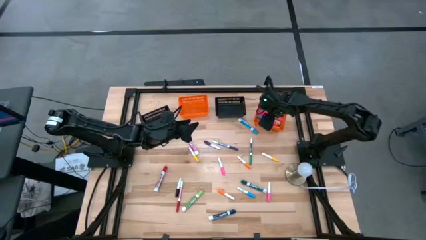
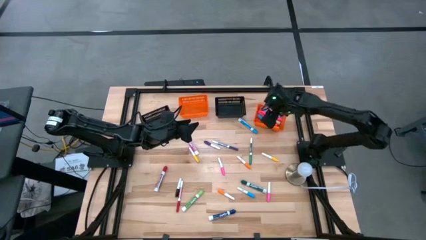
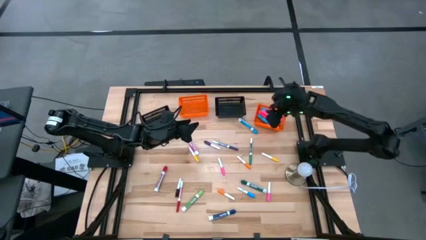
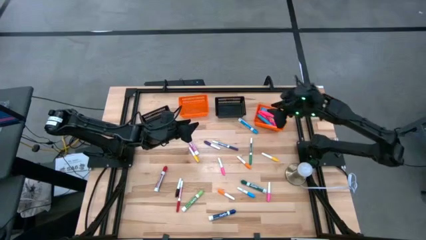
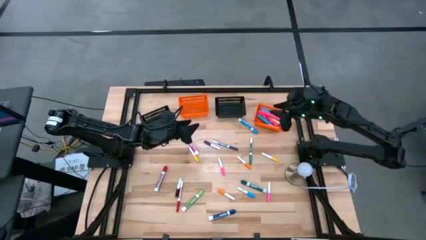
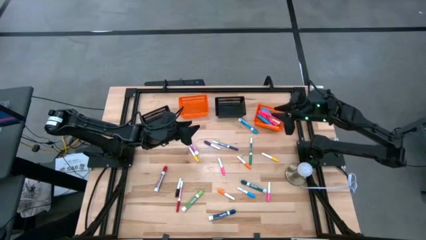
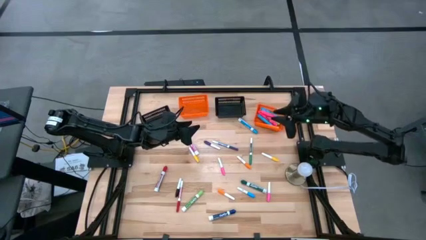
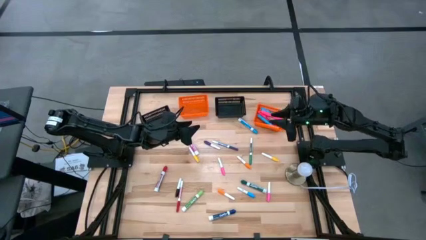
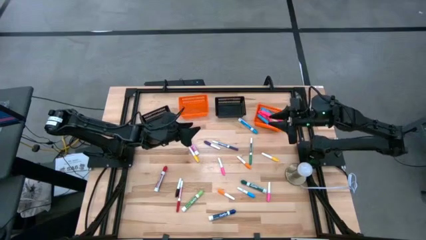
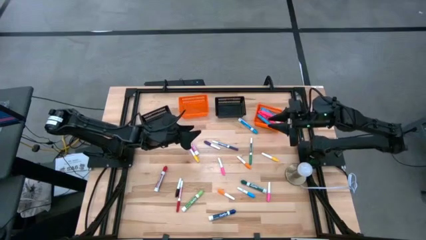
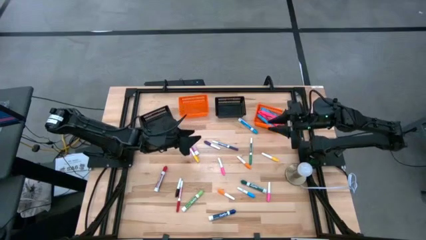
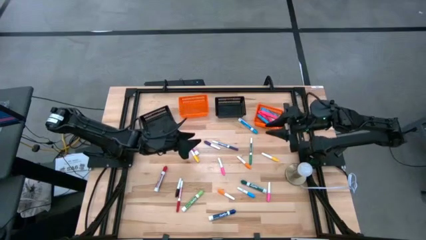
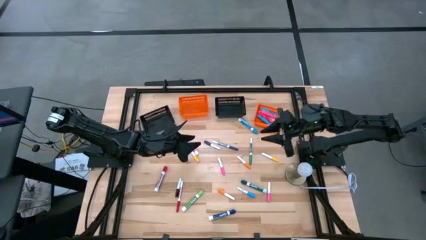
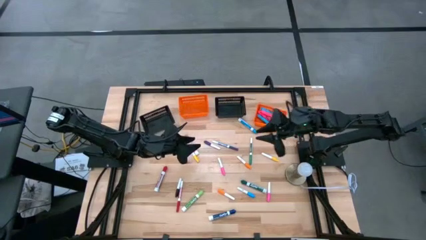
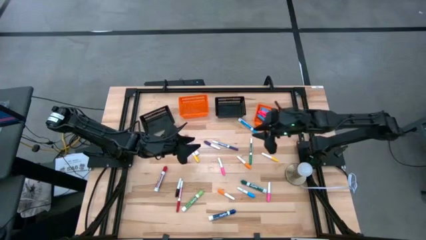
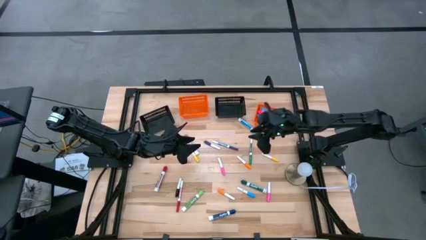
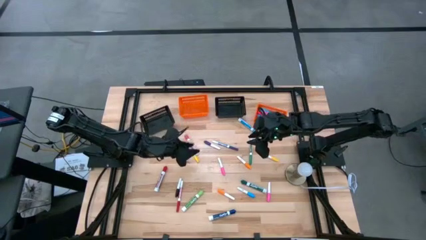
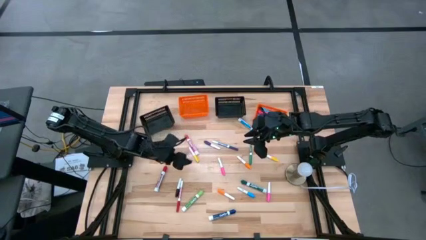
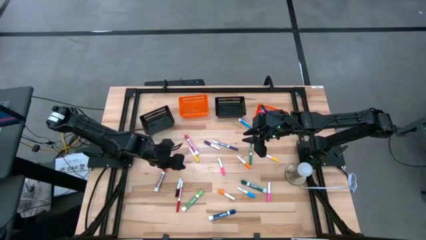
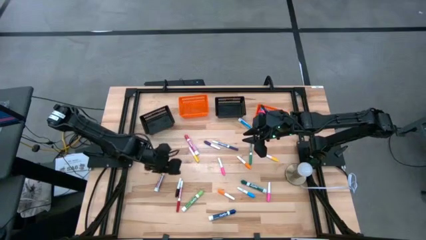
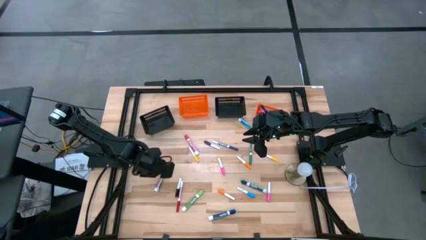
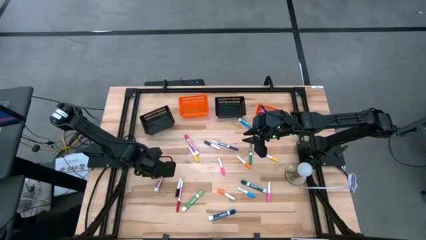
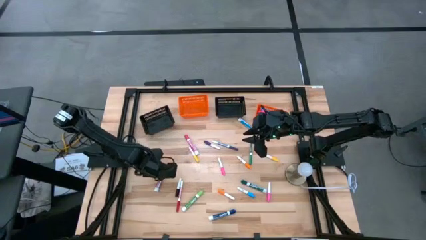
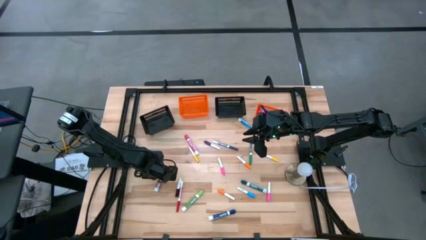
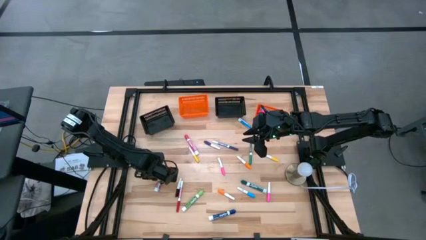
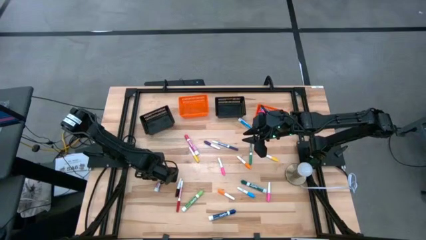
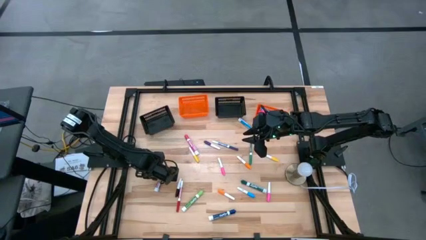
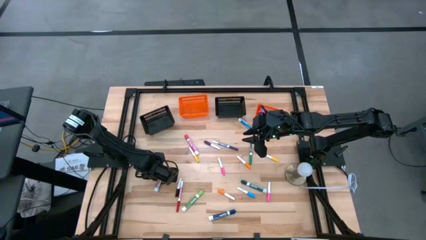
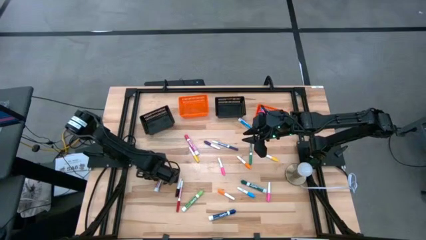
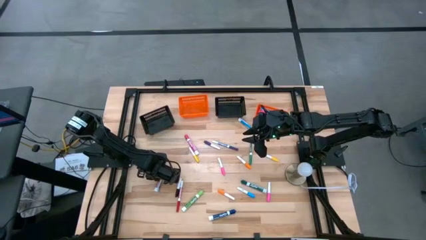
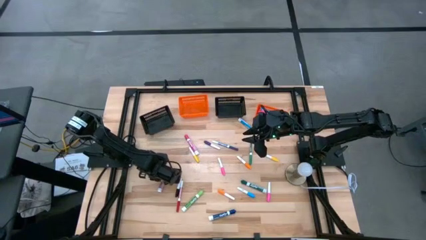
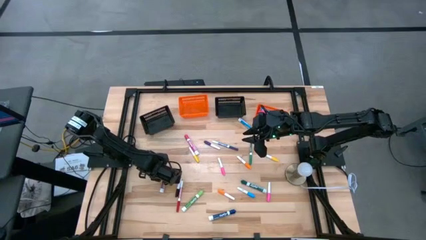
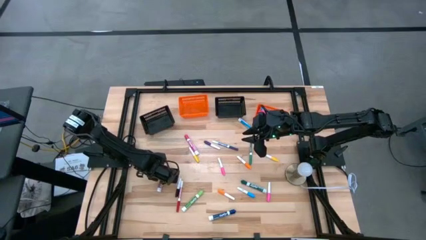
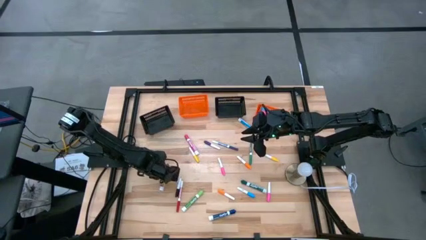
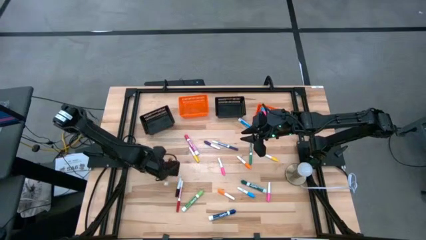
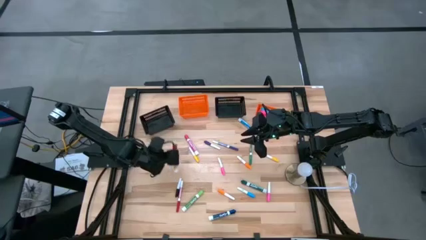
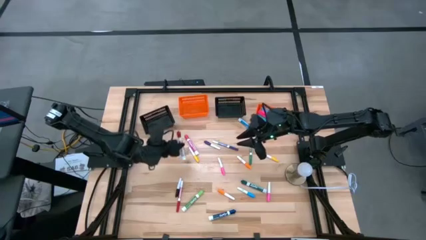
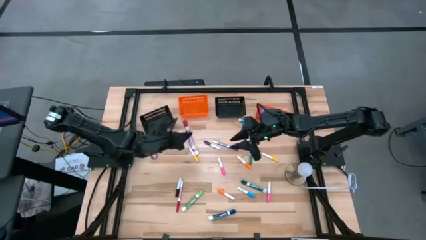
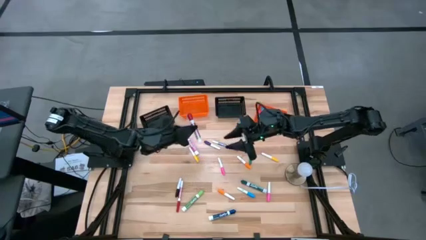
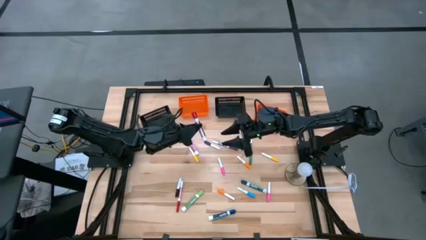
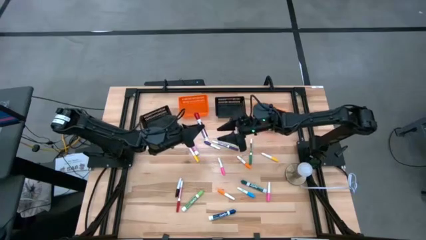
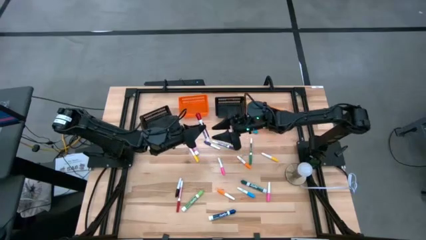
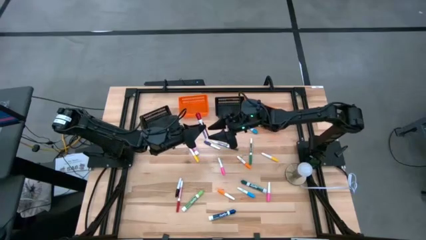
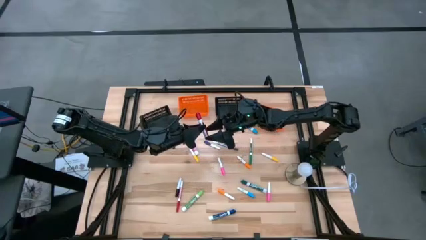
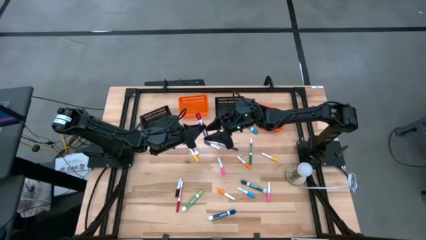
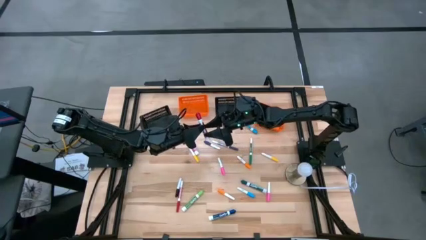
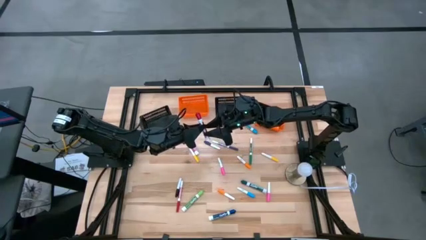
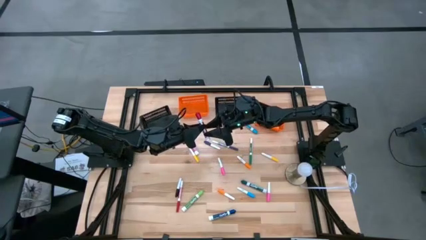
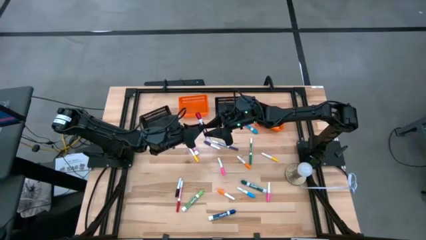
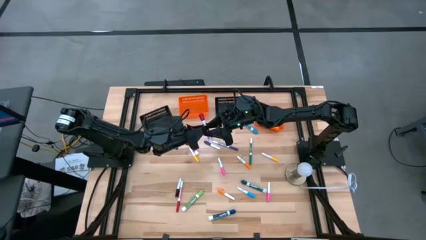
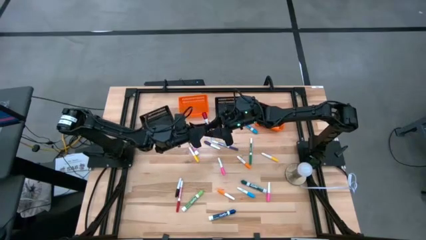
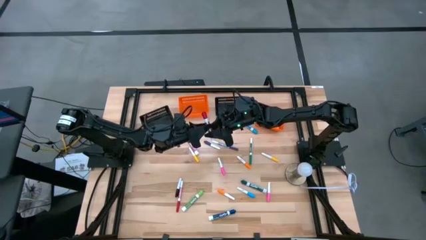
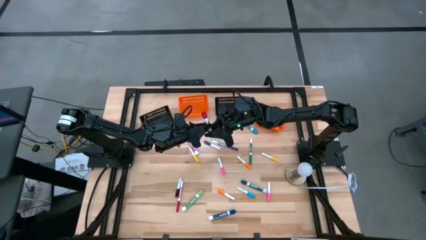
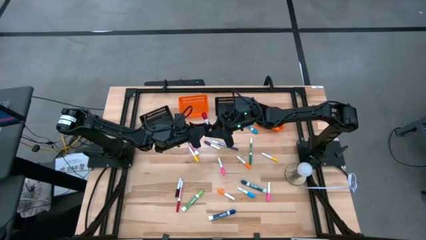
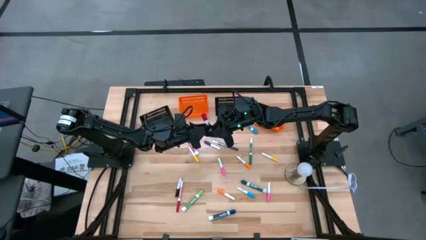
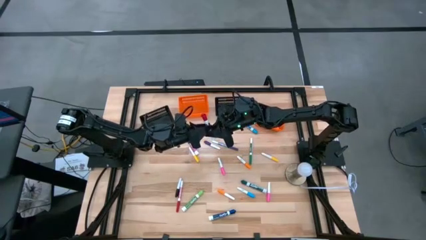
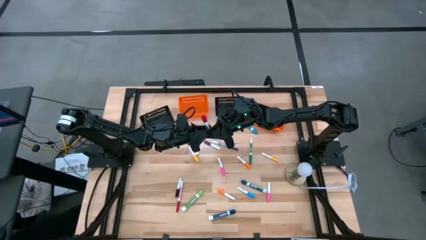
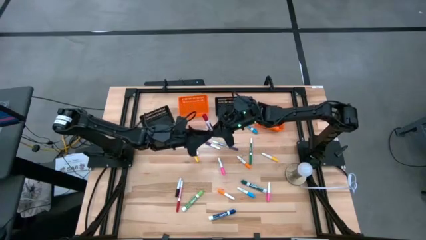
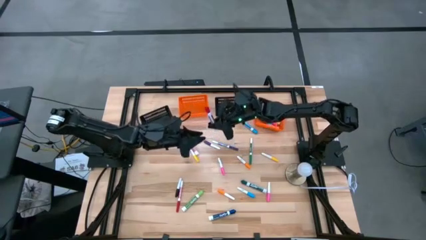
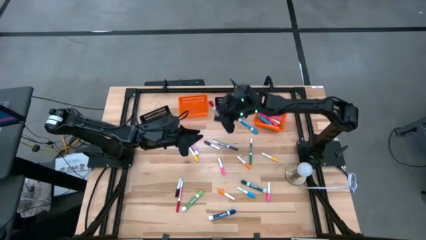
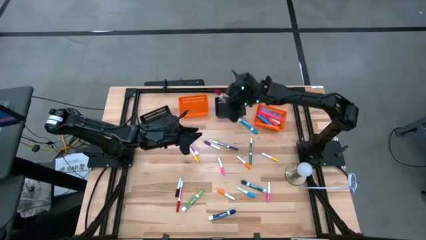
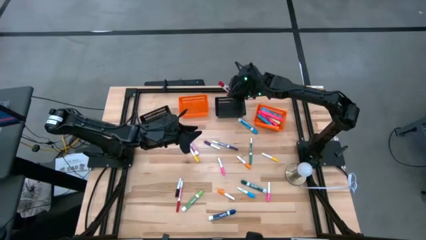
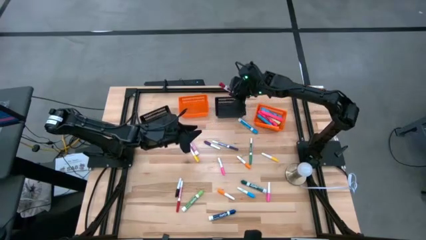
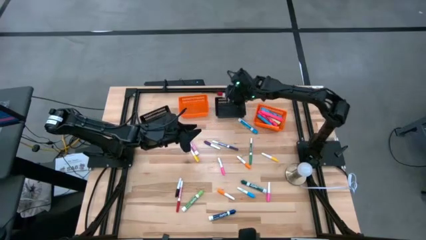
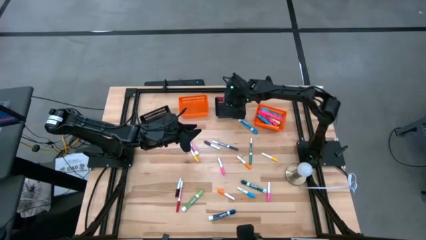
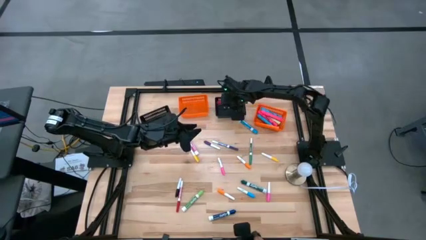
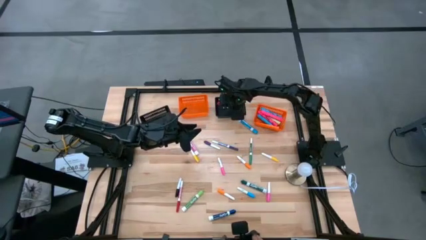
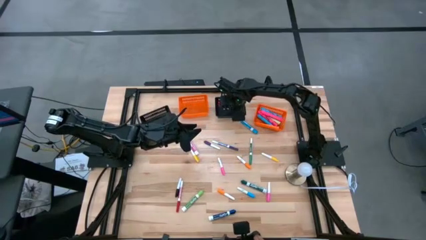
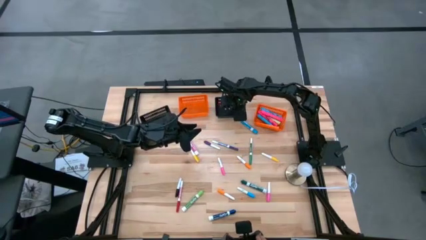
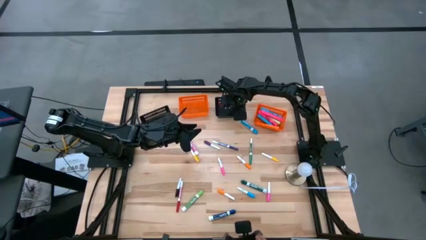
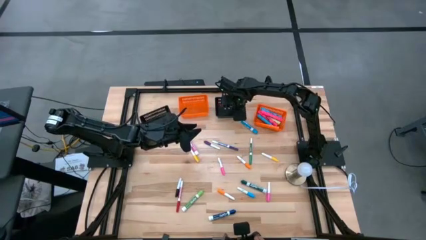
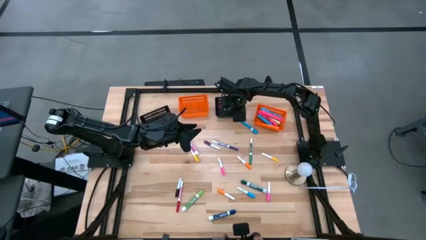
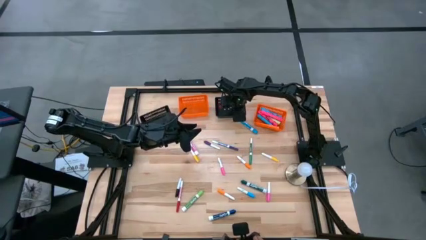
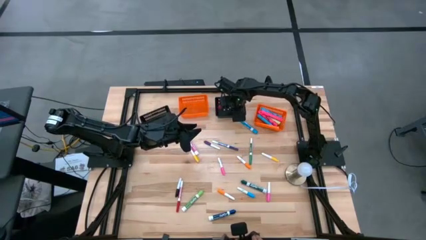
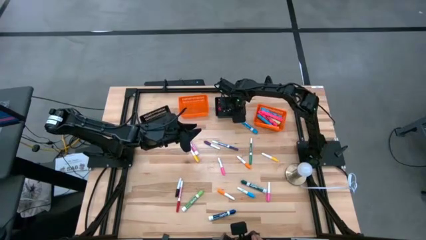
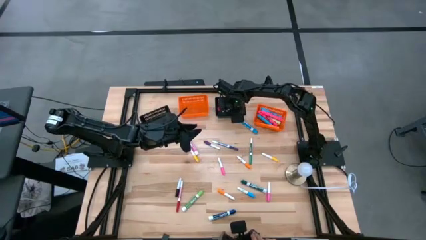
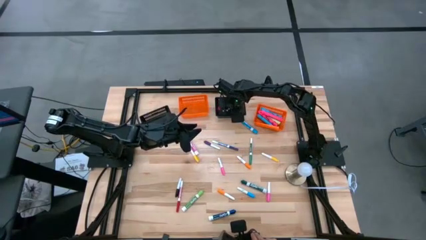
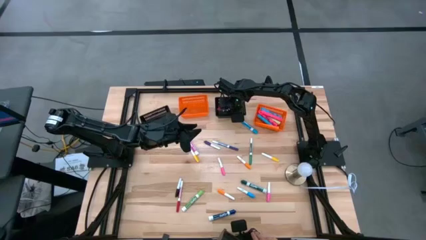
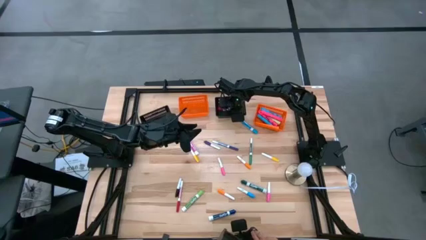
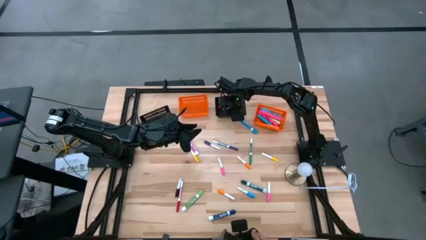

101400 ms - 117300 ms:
Task: Pick & Place Markers
Put the middle left white red marker into the middle black bin

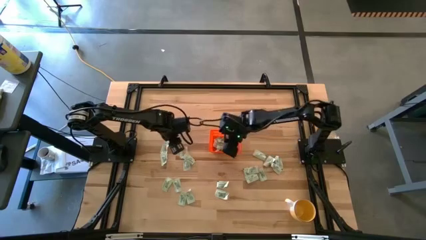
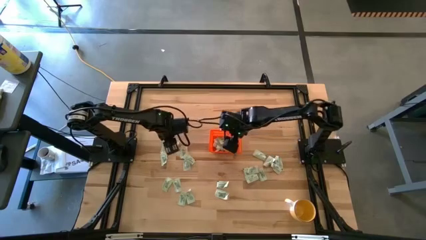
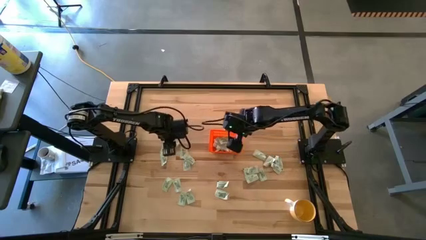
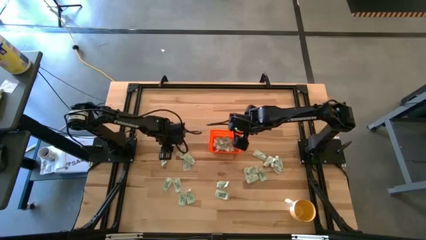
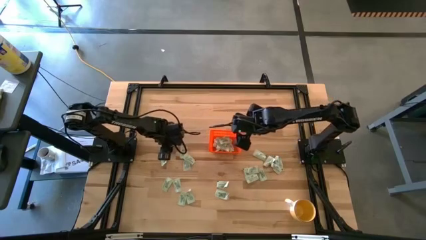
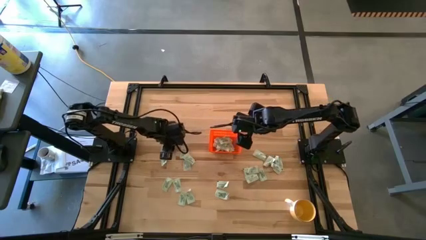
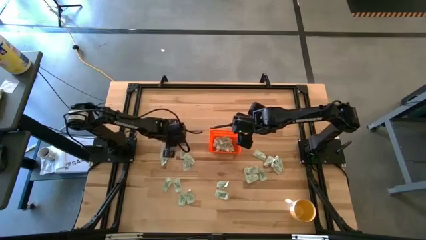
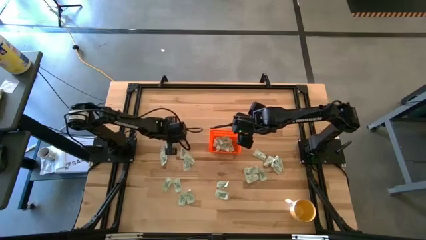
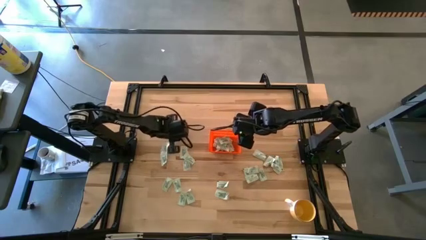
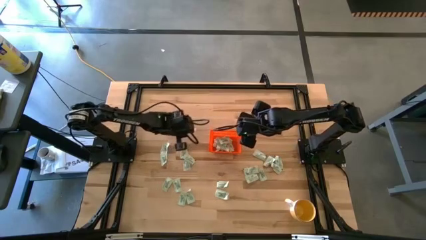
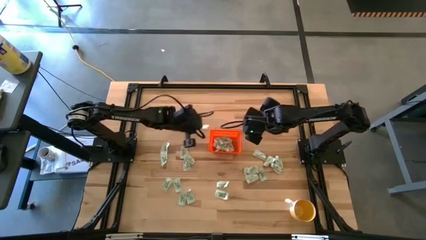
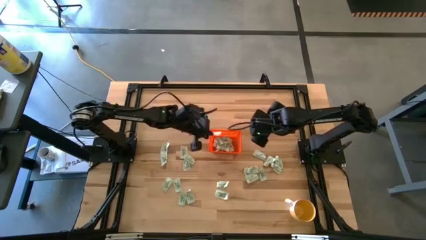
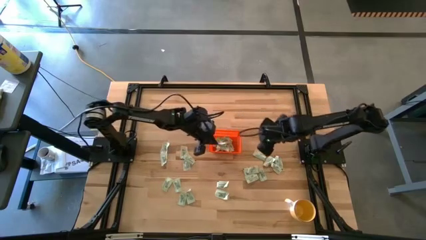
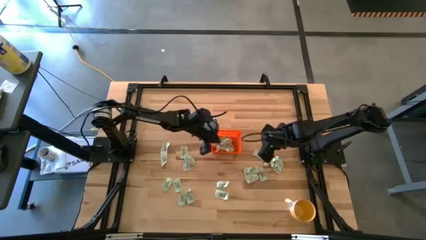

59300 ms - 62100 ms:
Task: Pick and place Stevia / Truvia into bins
Put the light green stevia packet into the orange basket
